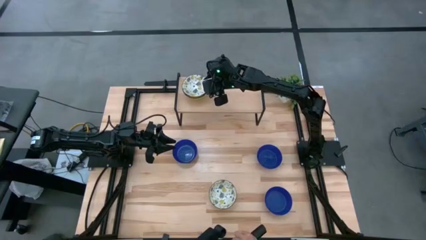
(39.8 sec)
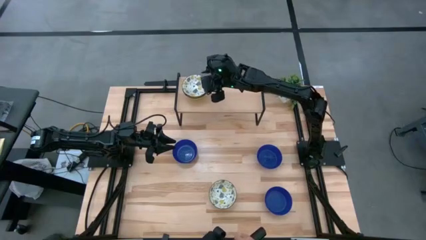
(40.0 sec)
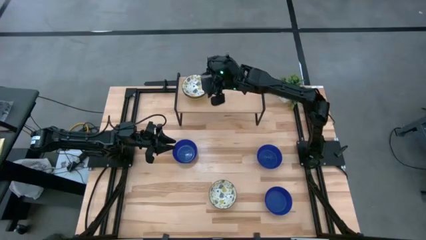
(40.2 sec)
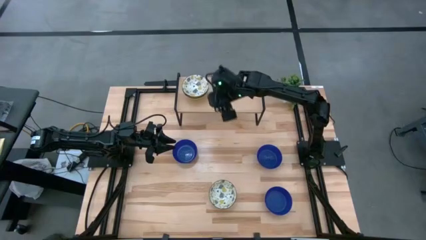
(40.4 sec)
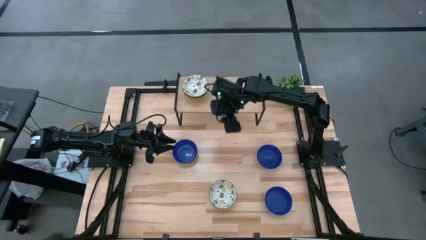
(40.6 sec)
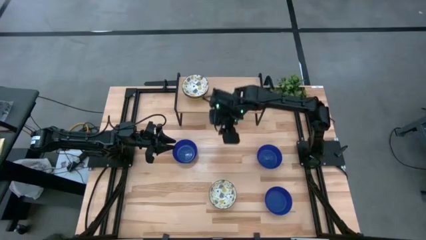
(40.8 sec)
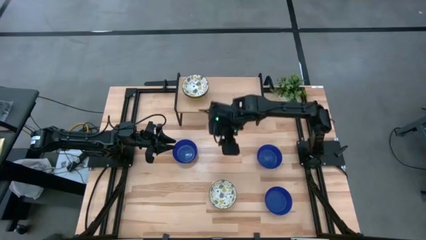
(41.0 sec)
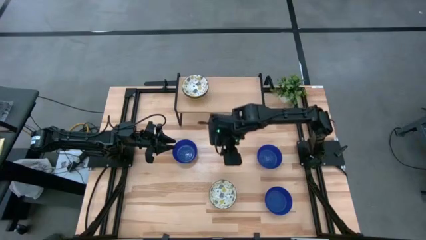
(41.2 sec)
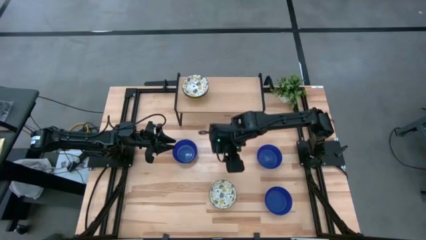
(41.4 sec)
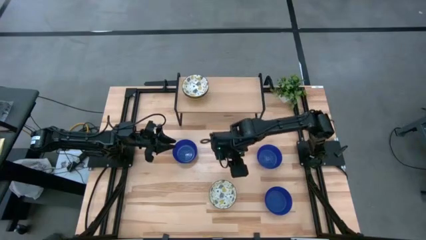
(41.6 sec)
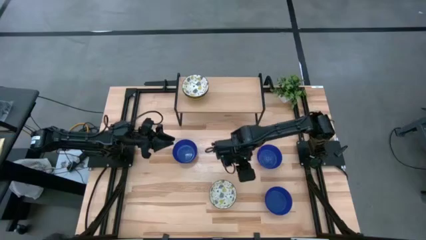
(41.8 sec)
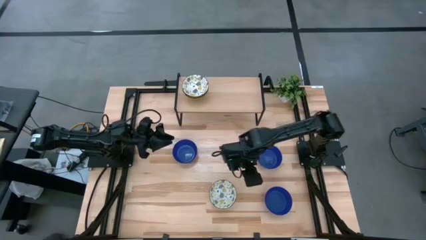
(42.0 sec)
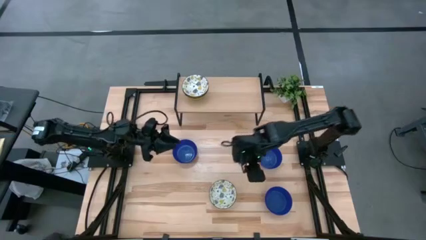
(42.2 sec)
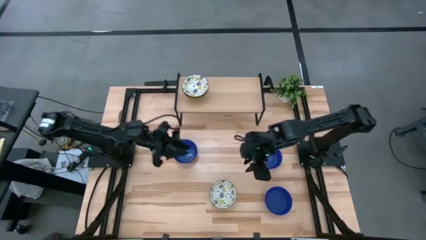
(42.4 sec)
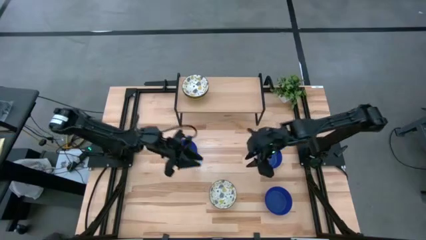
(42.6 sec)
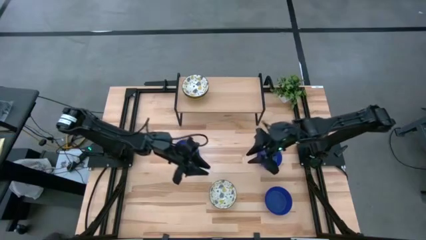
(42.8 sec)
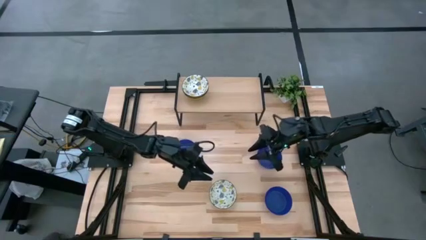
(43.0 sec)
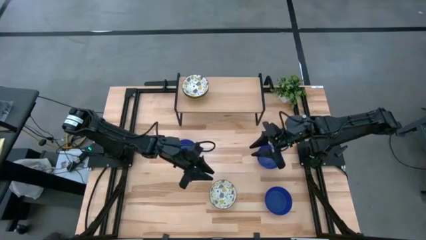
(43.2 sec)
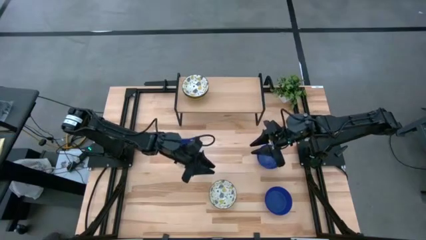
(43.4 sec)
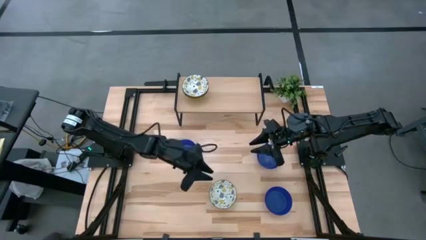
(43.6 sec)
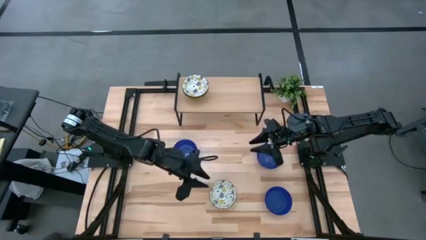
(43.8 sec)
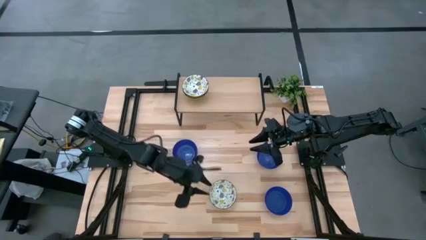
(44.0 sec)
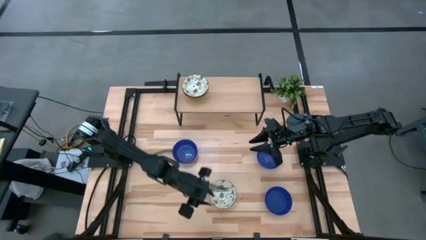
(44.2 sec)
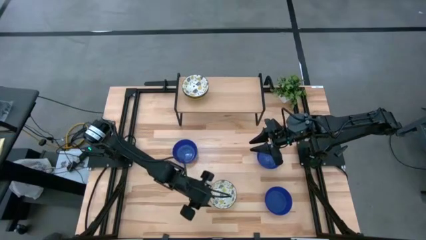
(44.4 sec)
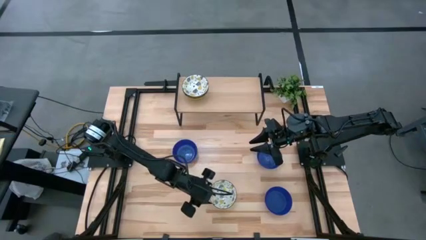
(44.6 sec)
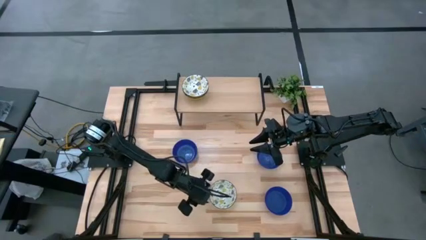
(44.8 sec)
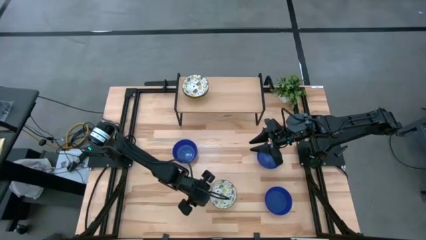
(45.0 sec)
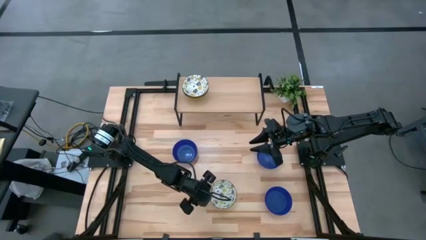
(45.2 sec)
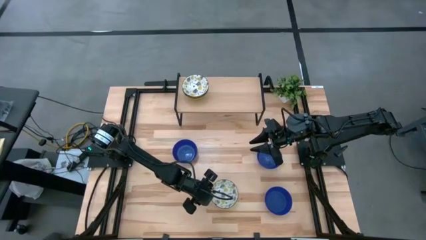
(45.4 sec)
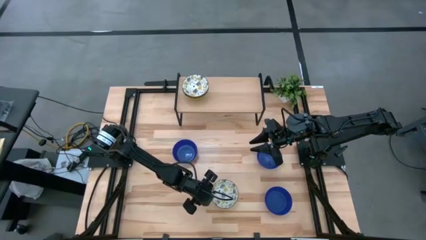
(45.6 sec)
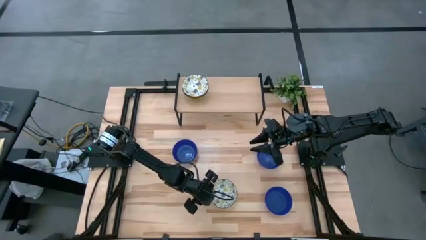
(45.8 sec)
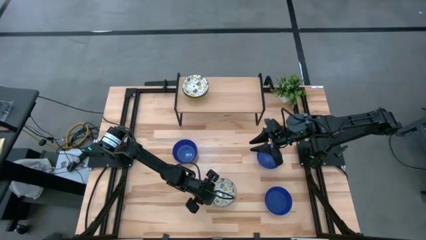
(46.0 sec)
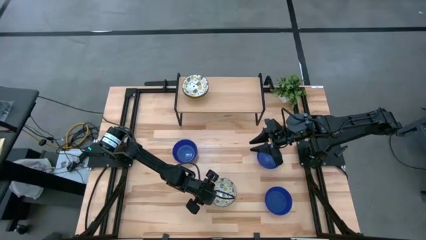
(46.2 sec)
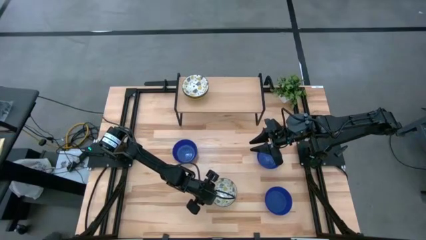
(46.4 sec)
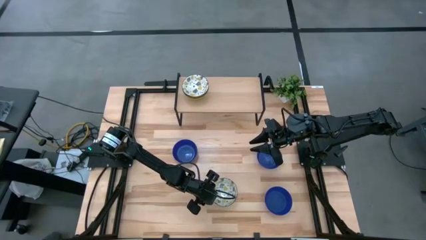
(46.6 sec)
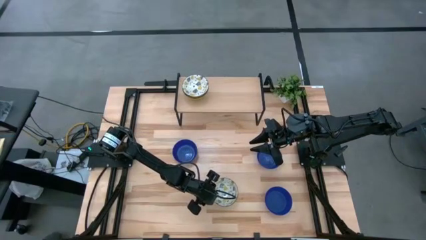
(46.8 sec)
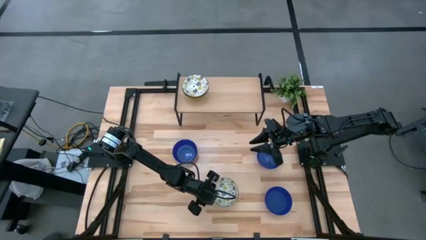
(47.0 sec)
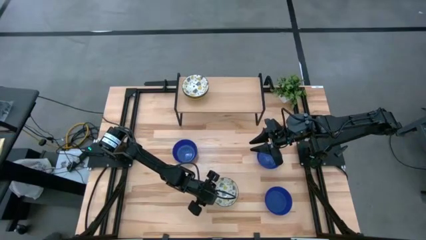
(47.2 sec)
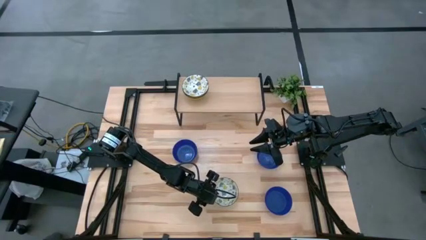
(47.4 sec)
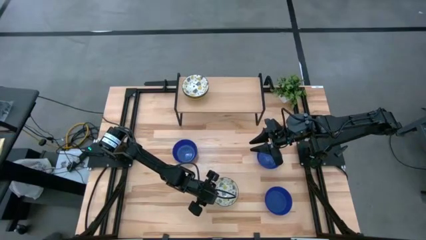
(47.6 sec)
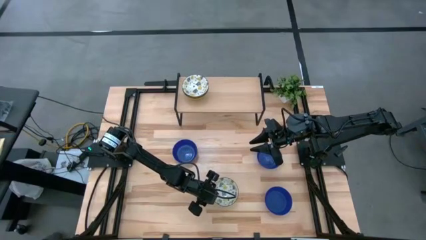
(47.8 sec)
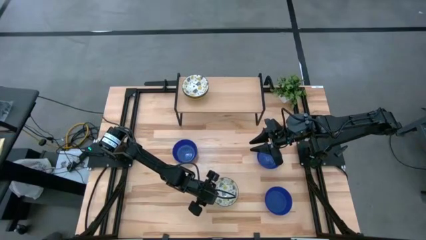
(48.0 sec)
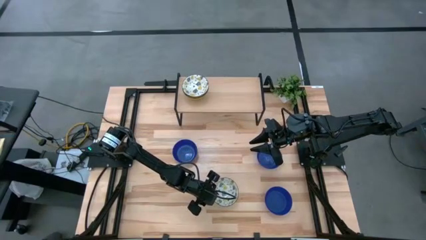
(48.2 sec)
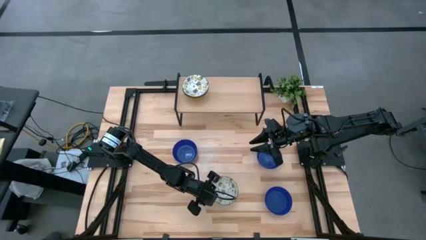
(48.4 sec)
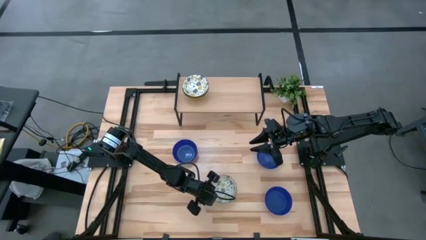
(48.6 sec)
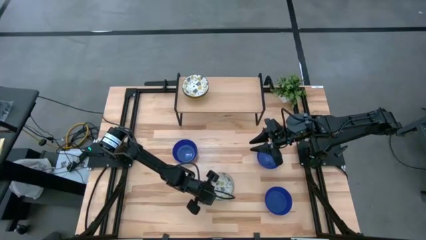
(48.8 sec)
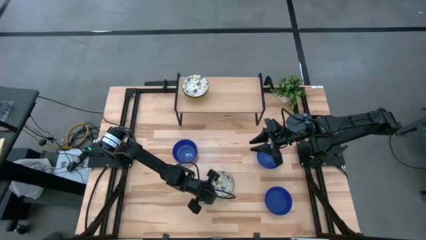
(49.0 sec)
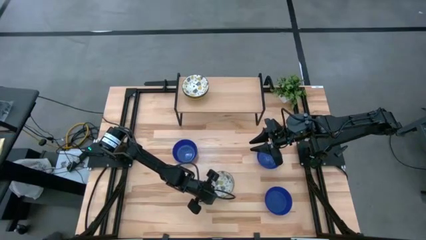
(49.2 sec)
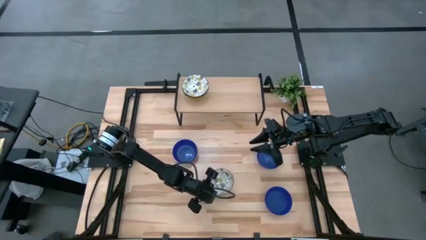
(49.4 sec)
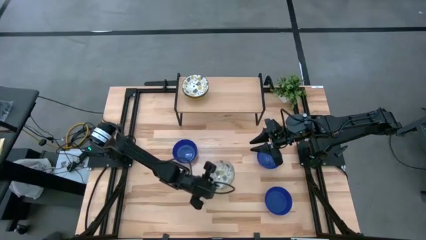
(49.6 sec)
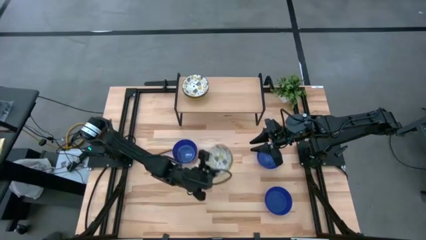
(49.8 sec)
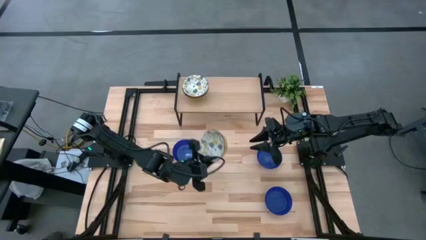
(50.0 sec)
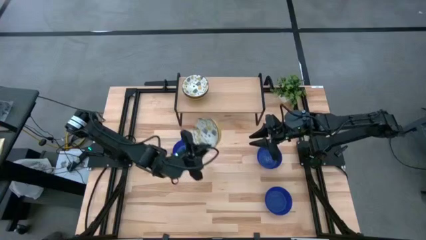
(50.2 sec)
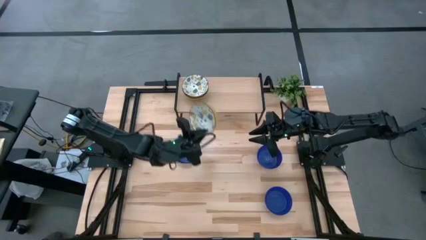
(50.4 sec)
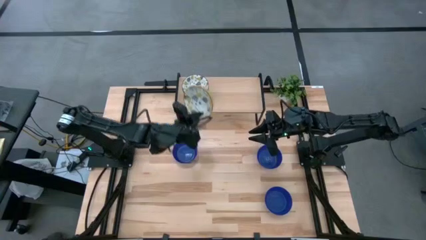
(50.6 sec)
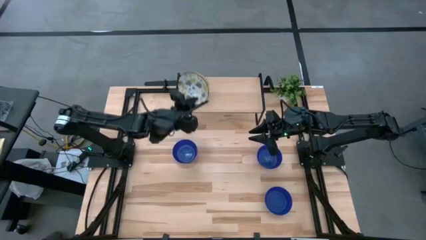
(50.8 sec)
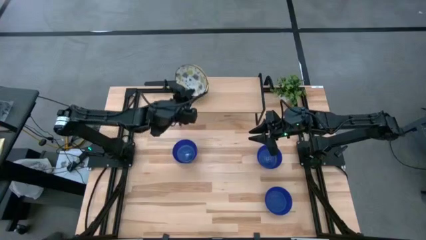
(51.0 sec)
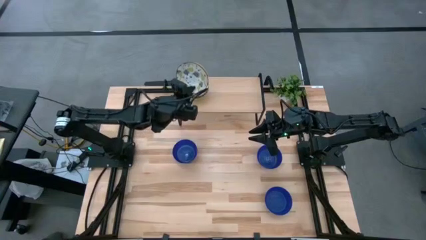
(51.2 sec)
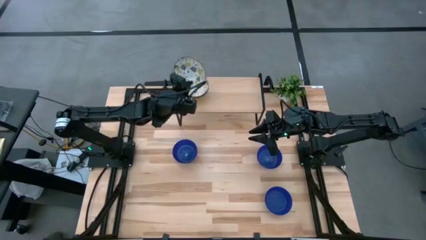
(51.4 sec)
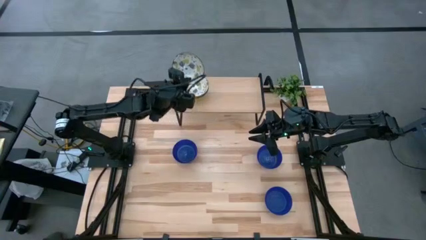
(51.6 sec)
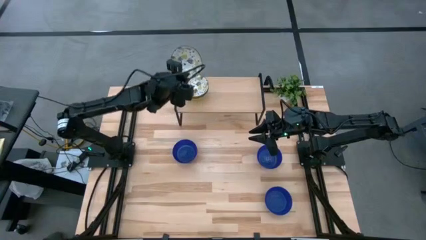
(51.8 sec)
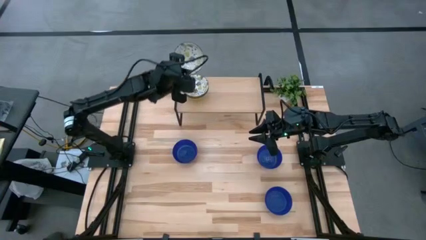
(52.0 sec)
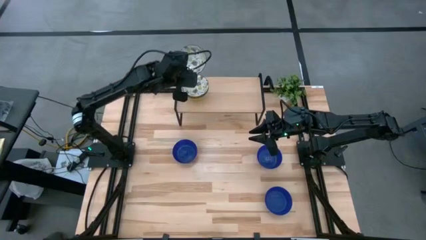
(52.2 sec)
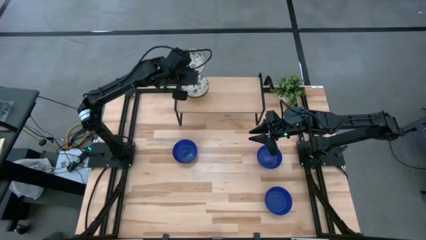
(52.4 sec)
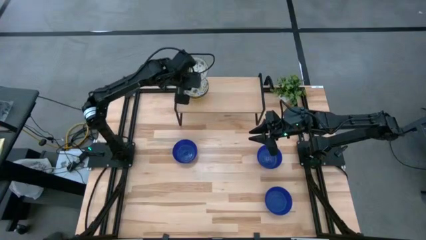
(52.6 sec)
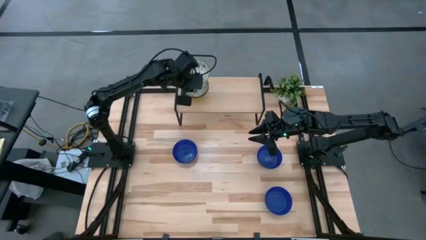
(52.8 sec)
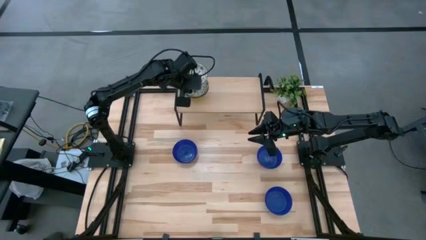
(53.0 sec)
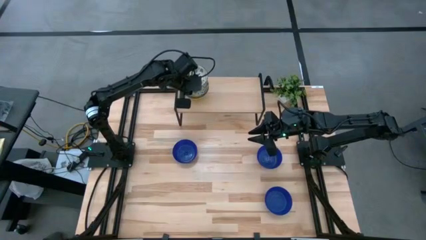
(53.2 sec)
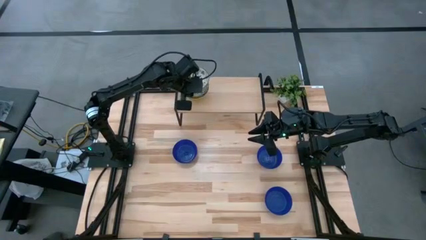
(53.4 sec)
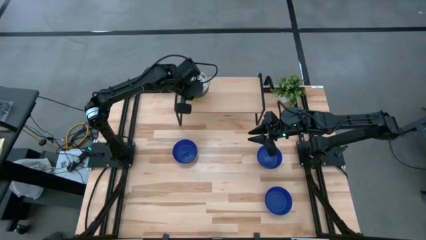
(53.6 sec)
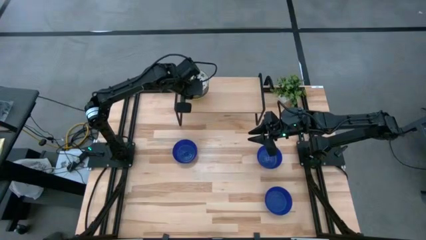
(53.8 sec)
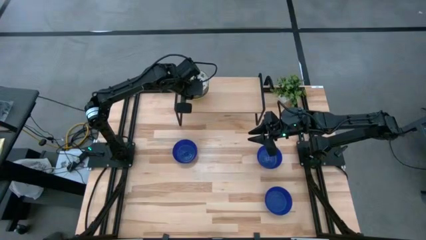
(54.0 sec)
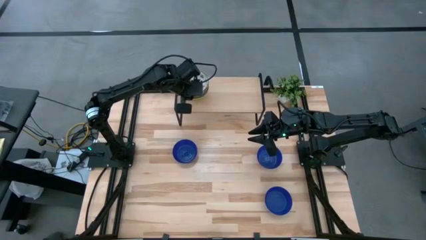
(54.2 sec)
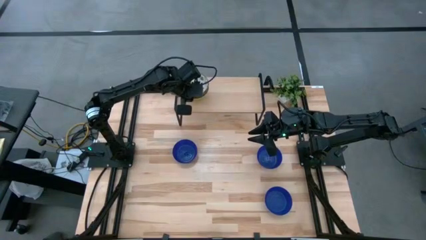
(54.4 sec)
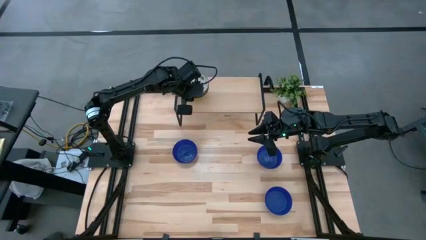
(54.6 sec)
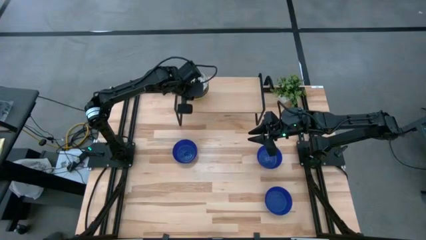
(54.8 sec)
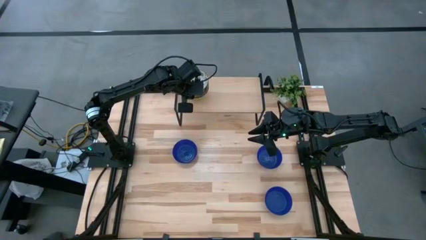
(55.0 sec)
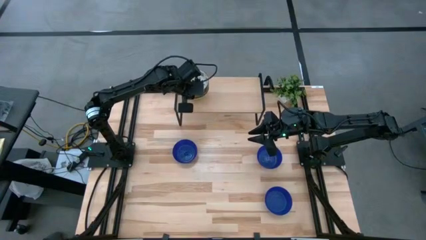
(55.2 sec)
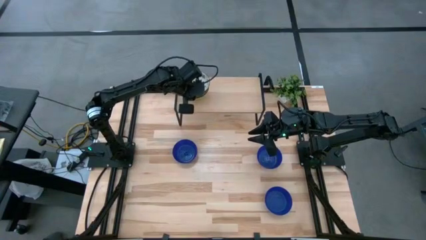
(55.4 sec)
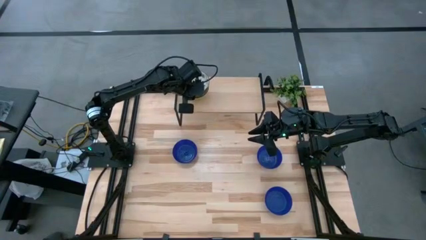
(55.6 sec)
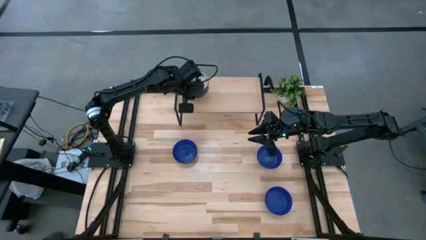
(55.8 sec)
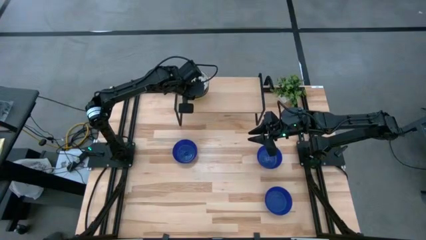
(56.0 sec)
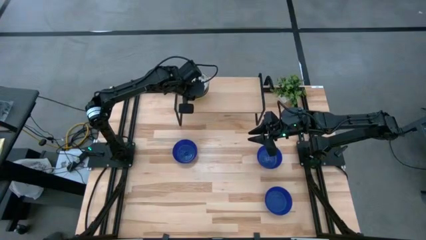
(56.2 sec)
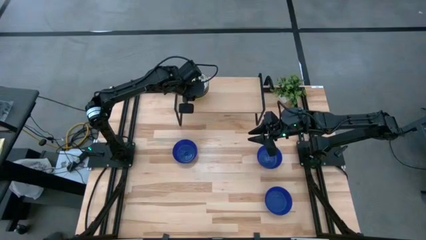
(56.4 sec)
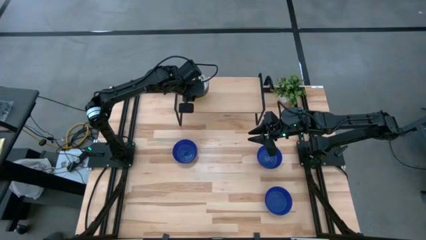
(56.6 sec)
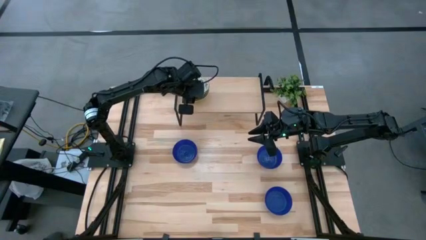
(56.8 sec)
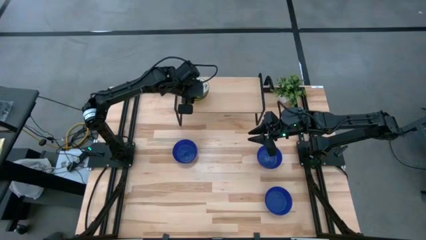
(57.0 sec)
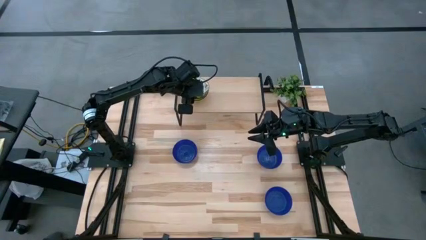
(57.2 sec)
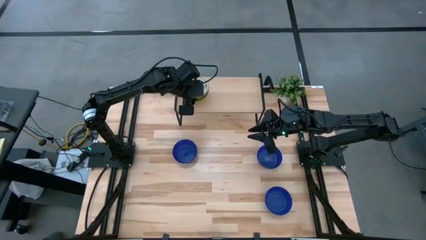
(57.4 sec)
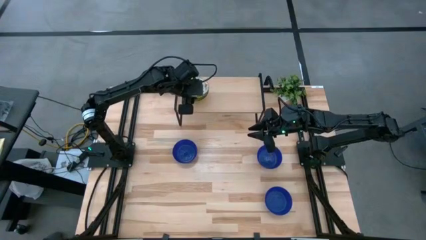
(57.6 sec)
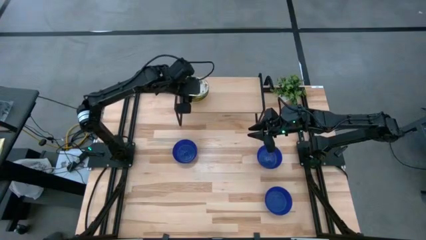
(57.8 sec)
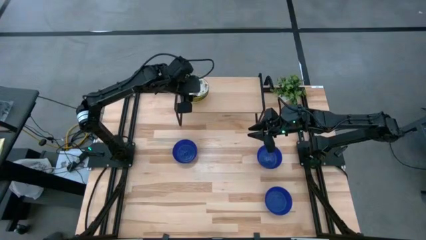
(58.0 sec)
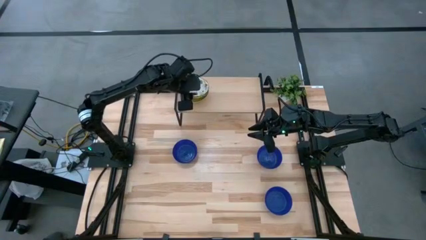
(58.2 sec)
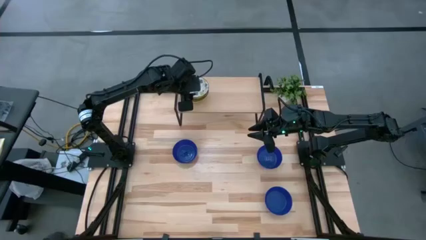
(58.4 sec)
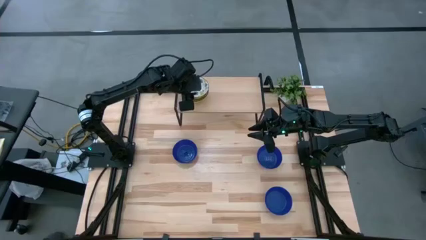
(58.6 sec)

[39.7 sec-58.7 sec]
Task: Pick & Place Mini bowls
Stack the yellow bowl on the yellow bowl on the shelf
